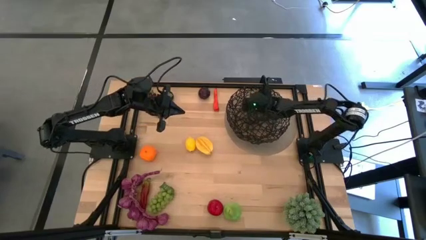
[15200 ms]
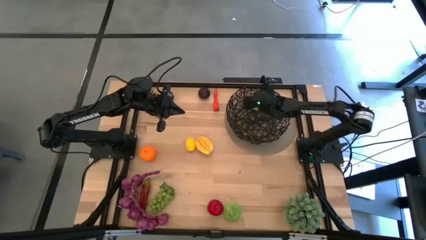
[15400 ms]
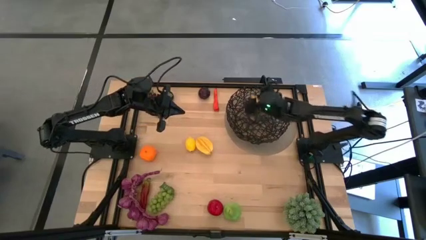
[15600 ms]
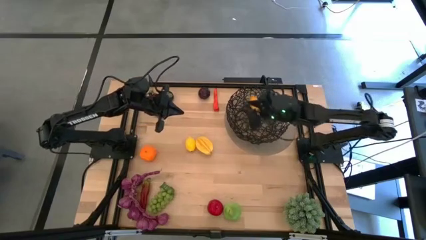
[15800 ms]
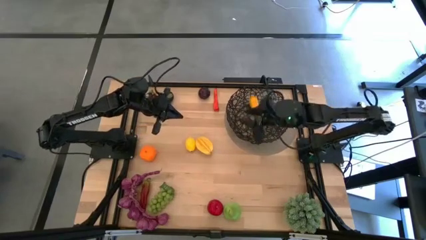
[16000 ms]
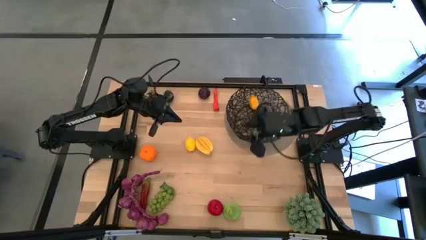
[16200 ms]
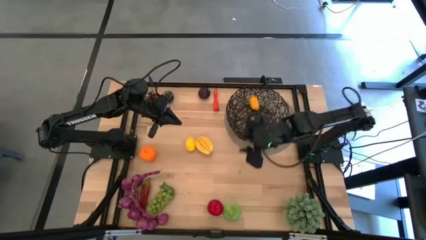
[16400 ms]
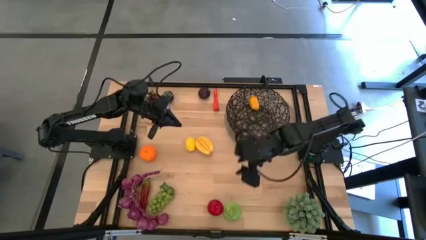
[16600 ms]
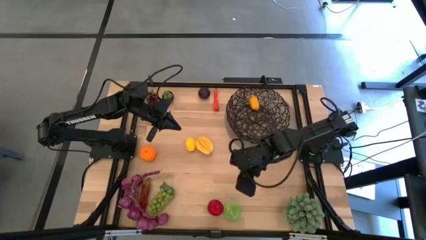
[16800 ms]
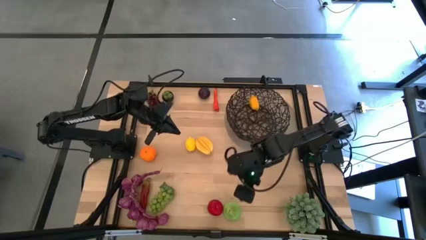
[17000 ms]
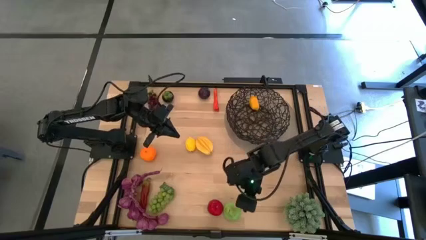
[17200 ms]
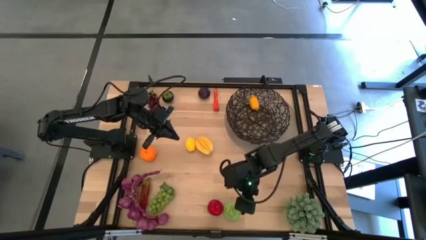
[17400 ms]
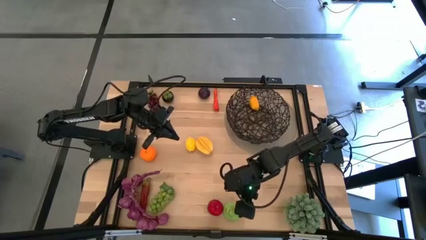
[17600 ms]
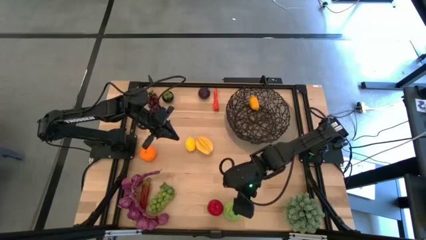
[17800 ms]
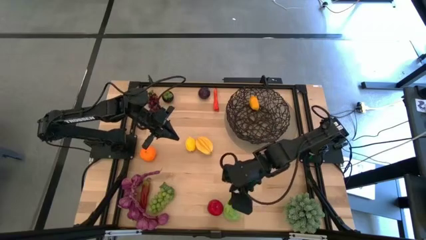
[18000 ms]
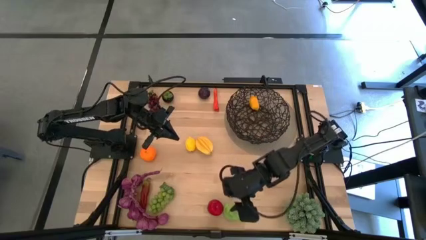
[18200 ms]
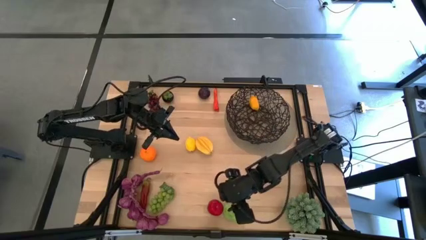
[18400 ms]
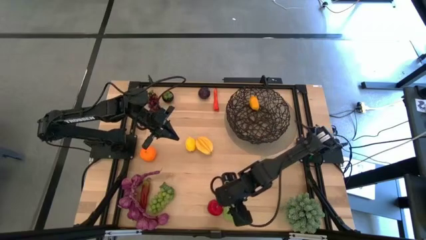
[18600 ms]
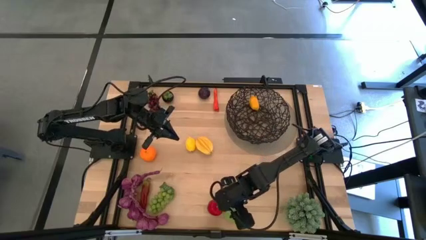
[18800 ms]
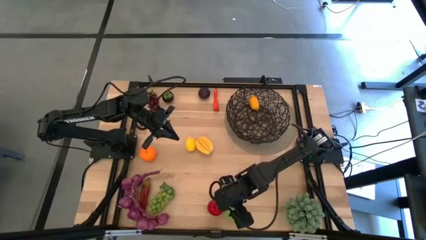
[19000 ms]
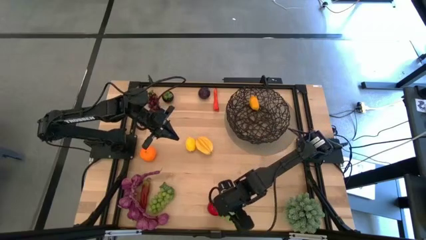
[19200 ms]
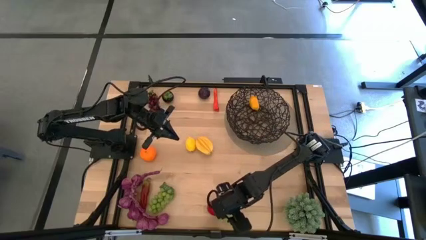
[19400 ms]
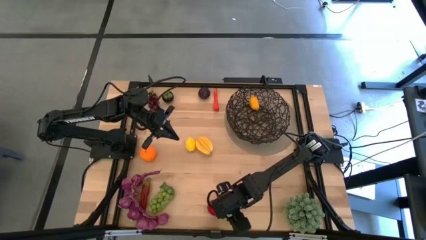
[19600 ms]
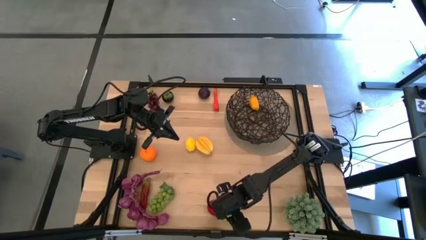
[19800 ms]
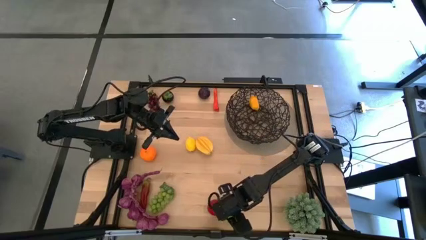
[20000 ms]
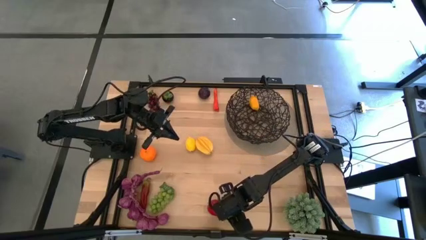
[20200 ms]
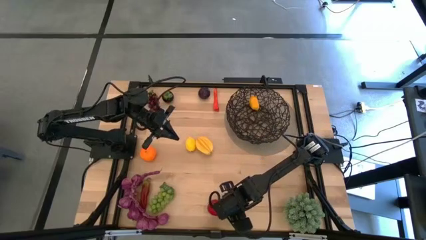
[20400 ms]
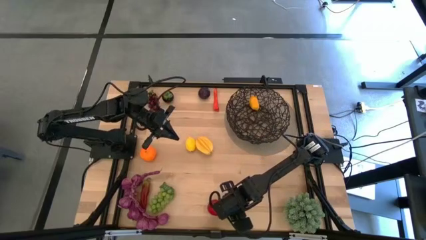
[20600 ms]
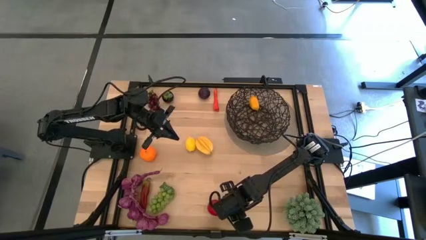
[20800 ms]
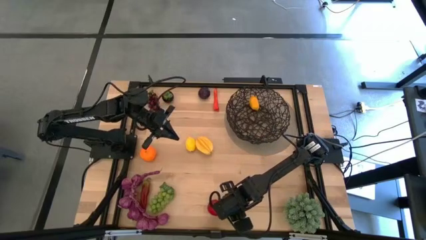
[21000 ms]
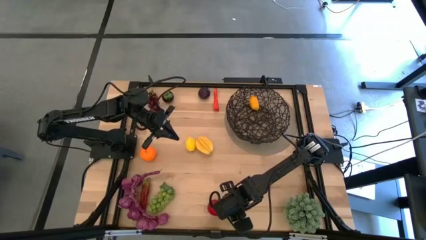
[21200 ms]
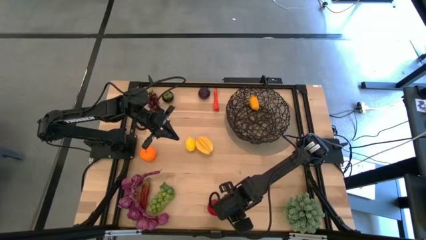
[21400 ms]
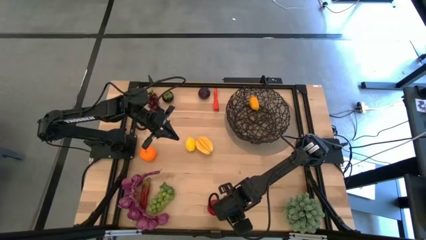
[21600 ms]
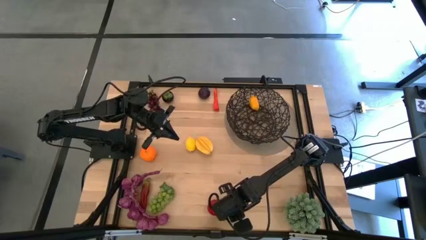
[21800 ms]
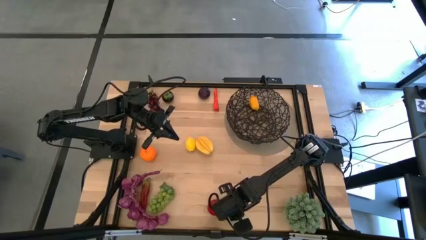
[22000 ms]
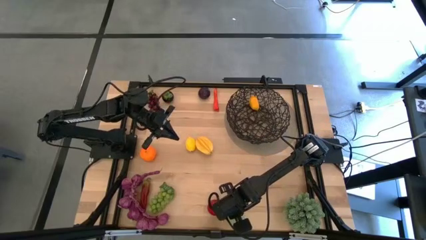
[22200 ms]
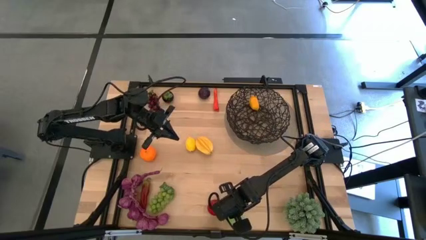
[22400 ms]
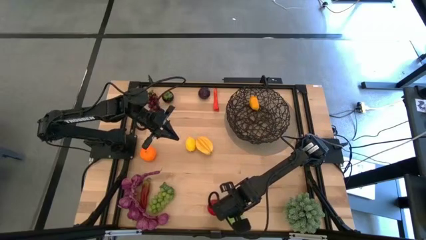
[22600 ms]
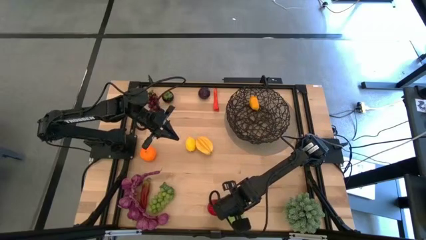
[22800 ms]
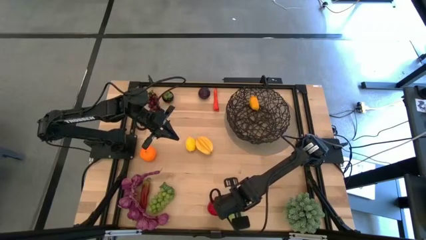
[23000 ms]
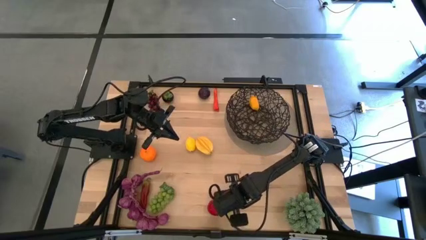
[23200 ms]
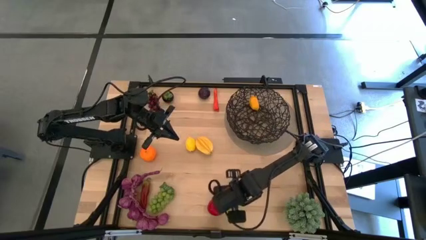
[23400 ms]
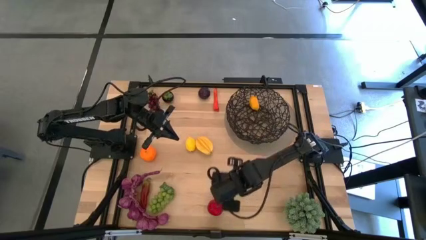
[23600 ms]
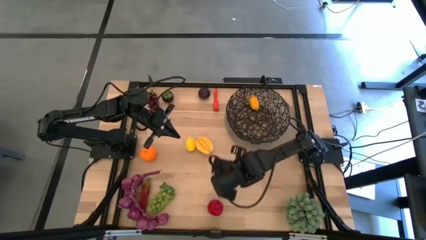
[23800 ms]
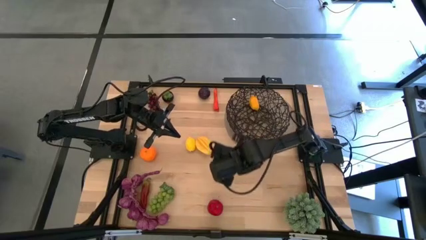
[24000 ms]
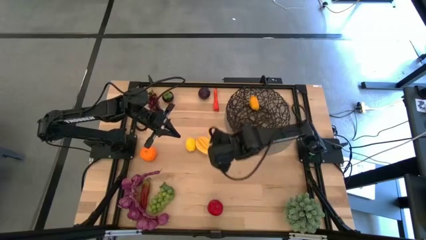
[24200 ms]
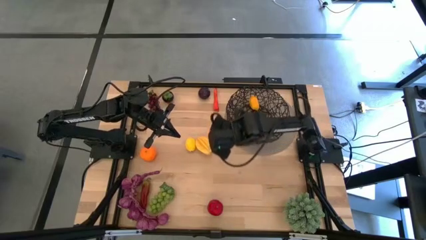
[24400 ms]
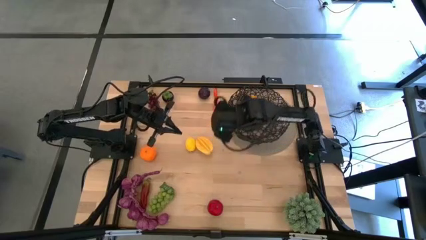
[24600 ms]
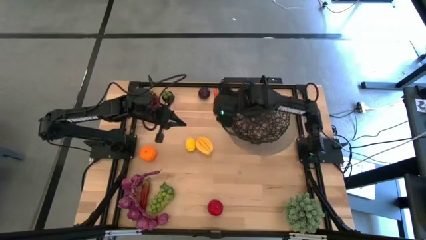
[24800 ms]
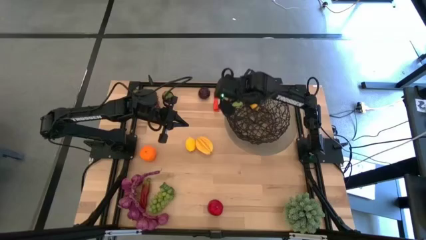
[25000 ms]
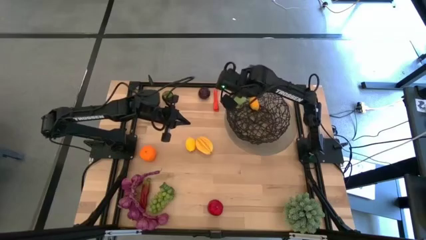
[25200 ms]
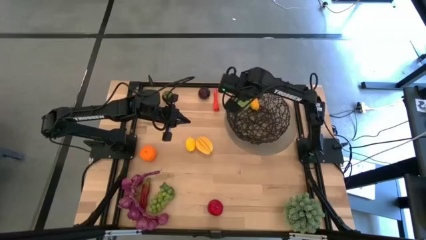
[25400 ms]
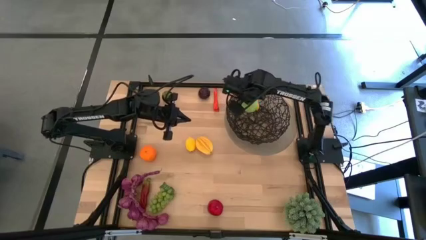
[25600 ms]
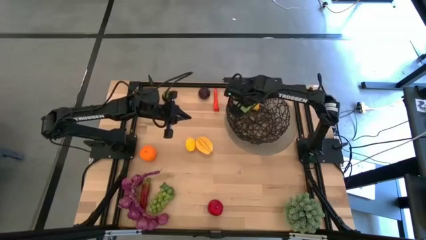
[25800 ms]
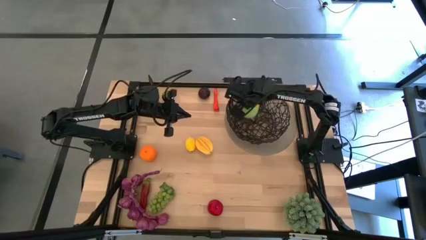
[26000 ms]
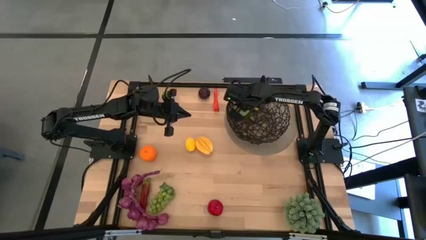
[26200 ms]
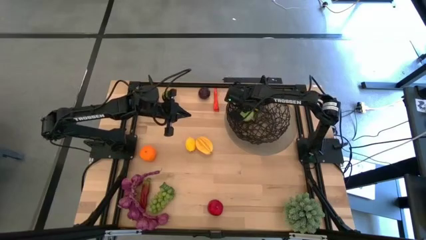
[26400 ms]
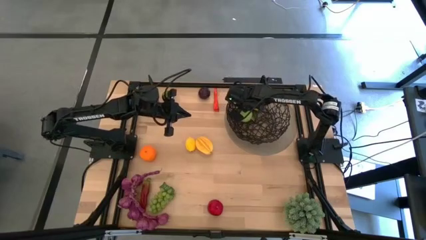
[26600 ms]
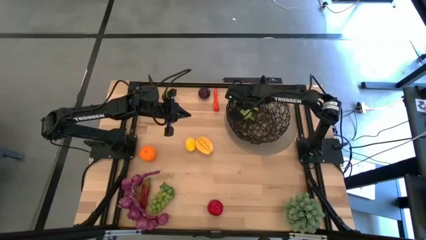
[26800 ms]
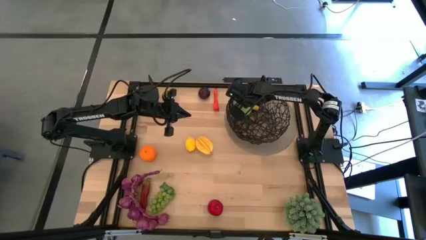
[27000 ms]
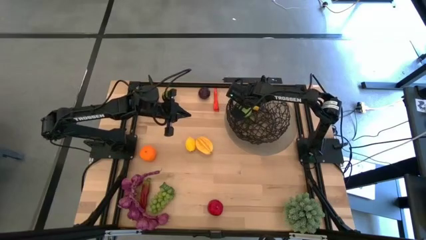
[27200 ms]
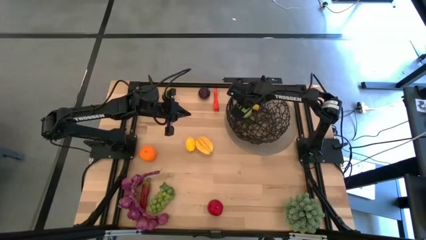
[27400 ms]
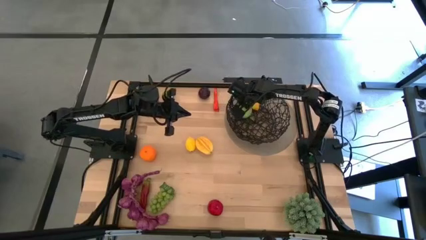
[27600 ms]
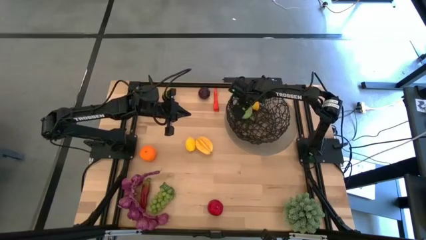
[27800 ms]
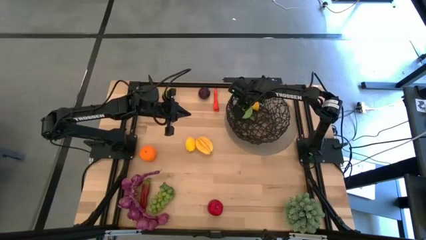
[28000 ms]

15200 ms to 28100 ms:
Task: Build produce basket
Put the green pear into the black wire basket

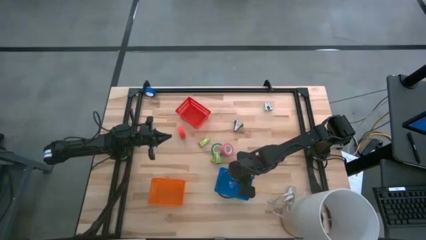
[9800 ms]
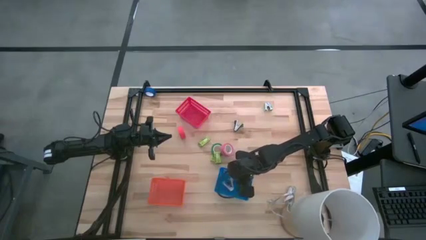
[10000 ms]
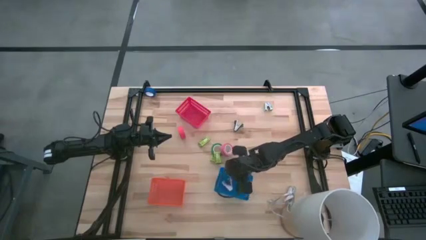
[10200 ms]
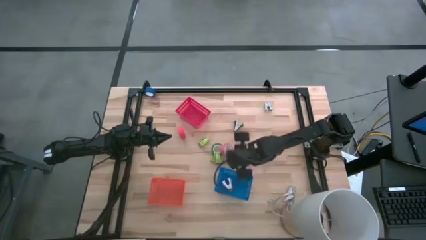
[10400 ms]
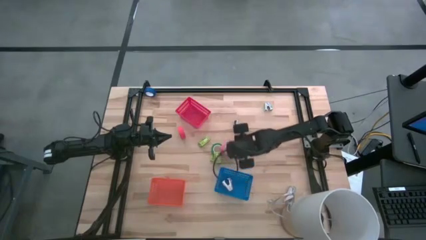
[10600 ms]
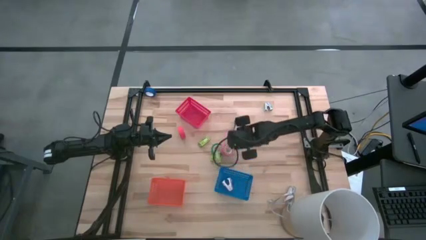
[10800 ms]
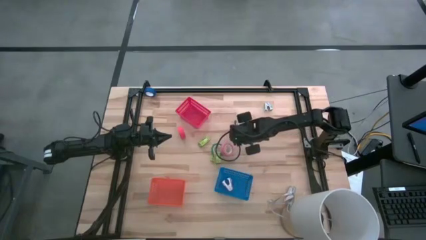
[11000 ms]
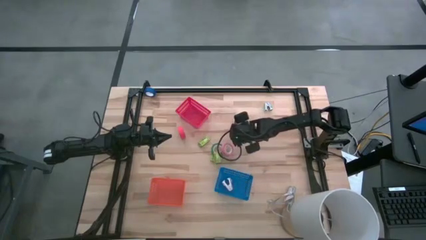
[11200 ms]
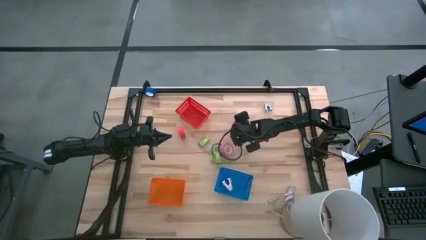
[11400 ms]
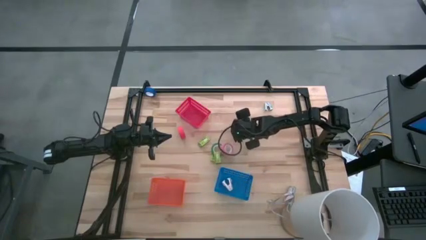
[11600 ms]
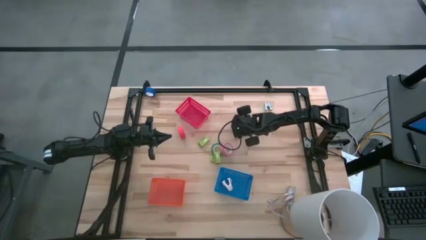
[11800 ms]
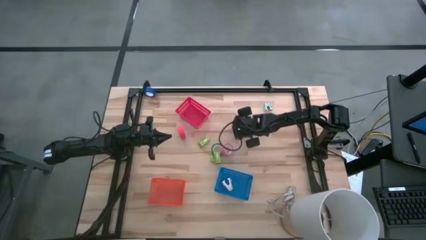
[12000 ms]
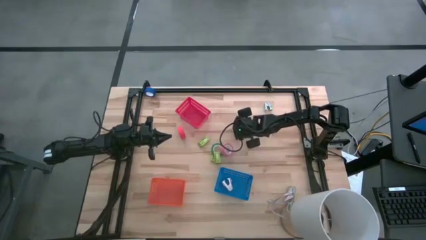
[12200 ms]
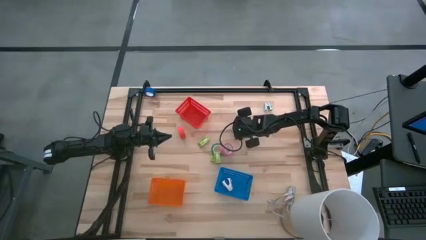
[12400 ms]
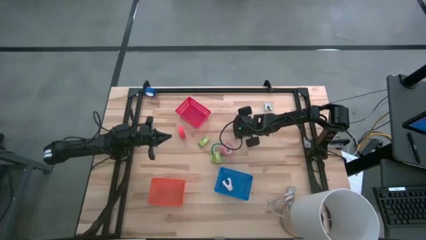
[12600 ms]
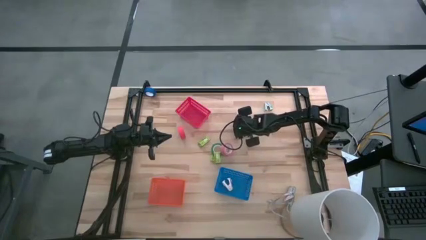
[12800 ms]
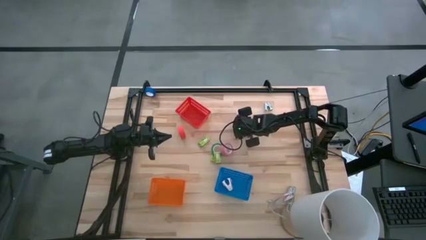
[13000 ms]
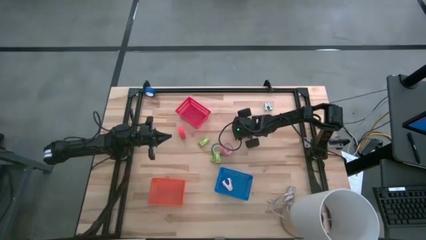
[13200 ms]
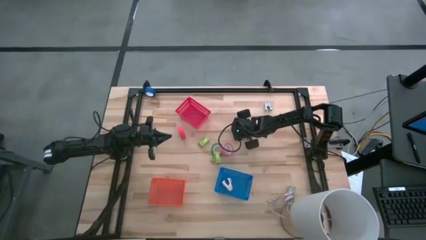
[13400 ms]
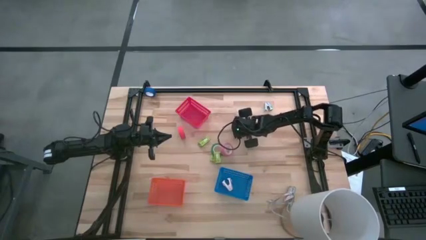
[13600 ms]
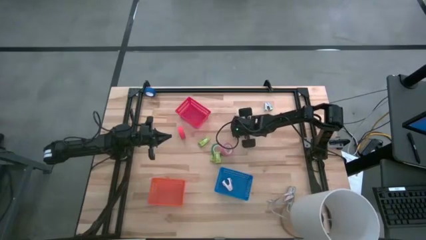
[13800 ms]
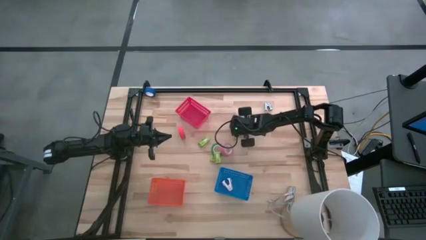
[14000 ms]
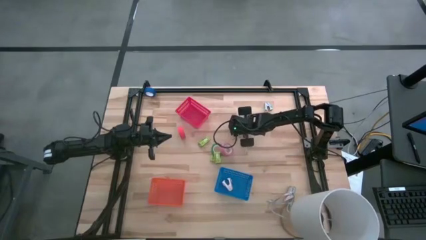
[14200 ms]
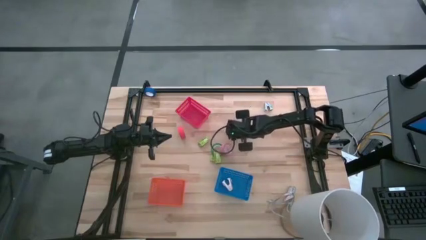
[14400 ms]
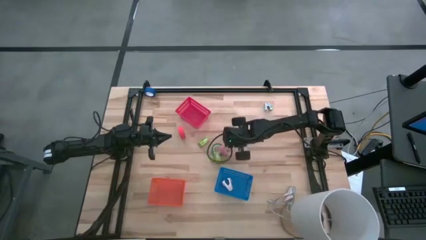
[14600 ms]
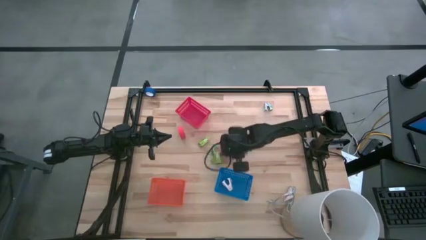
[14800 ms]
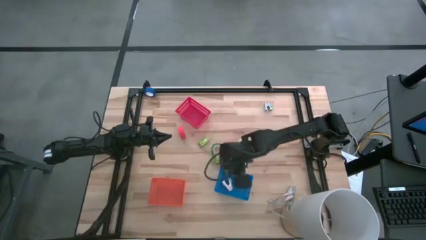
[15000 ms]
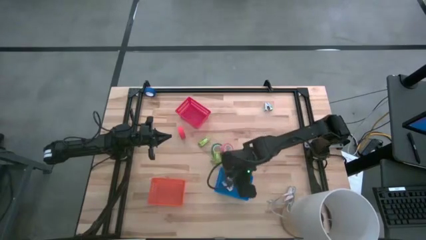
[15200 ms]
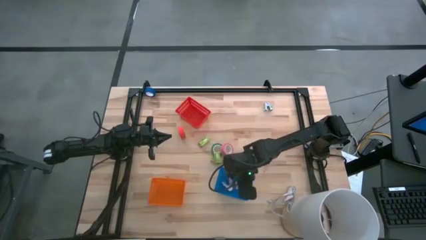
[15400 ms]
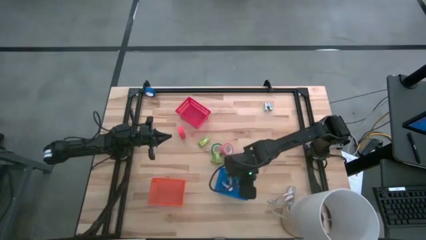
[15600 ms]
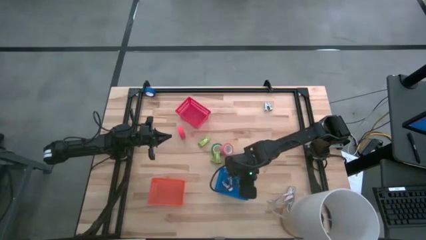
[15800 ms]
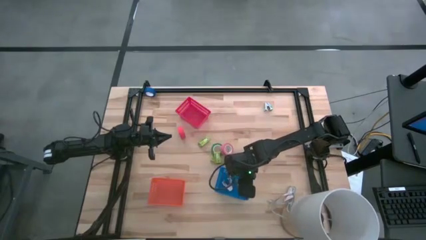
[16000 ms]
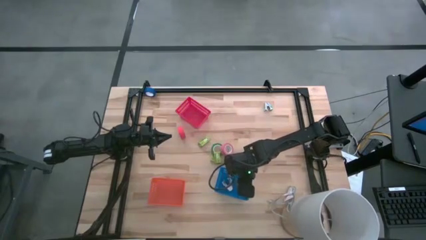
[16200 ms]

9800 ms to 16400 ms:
Task: Pick and place Stapler, Stapler remover, tape
Put the black stapler remover into the blue bin
